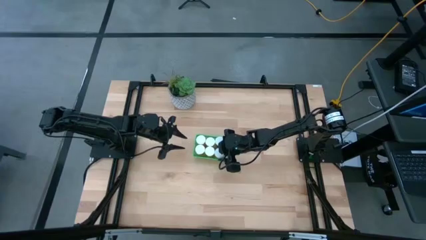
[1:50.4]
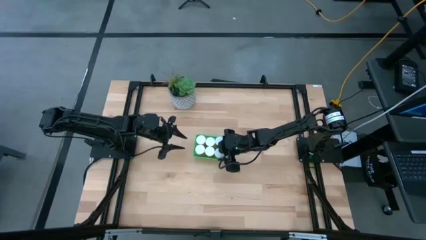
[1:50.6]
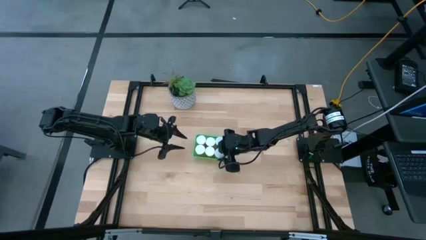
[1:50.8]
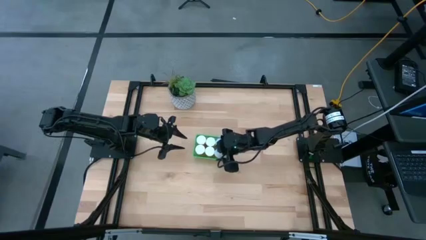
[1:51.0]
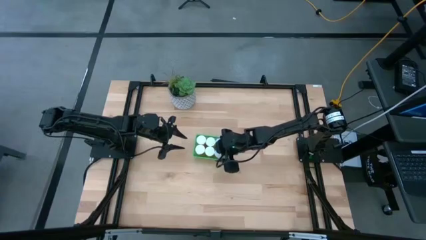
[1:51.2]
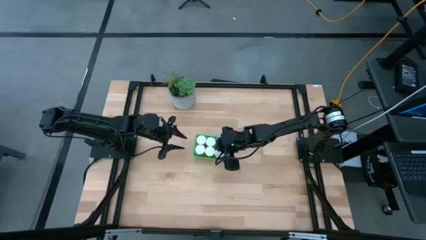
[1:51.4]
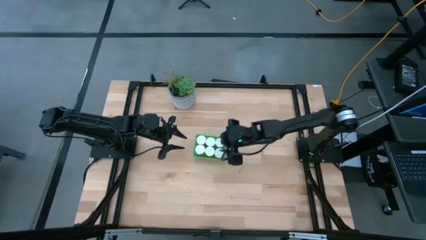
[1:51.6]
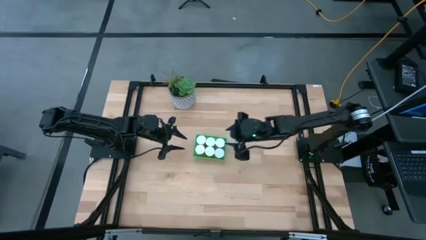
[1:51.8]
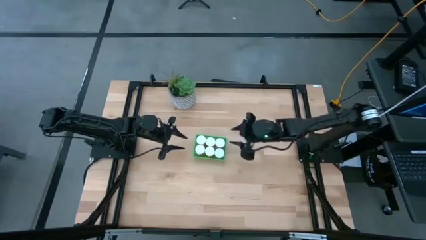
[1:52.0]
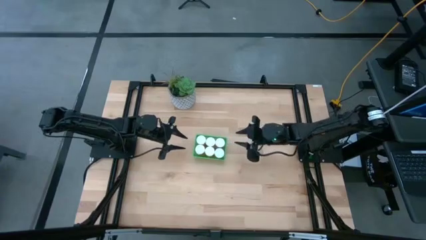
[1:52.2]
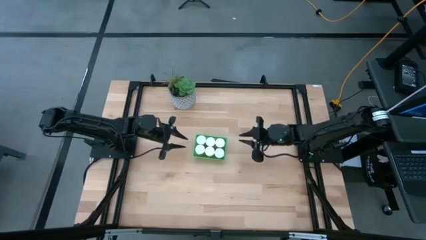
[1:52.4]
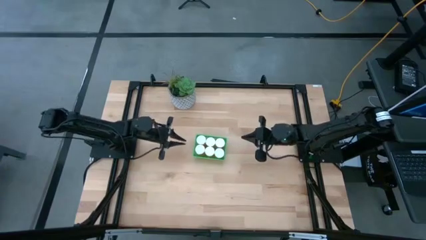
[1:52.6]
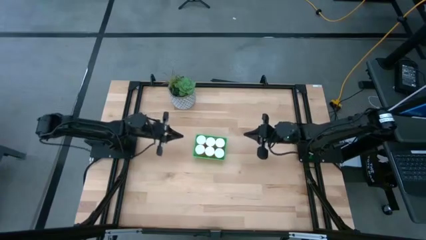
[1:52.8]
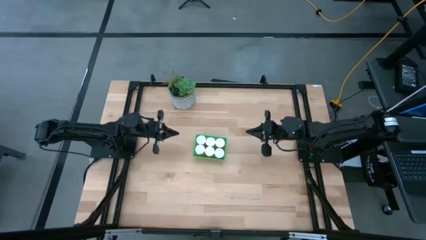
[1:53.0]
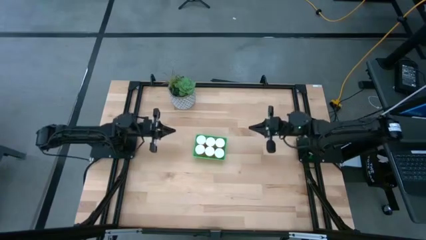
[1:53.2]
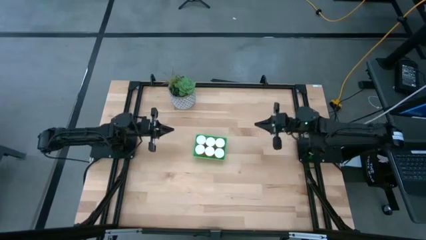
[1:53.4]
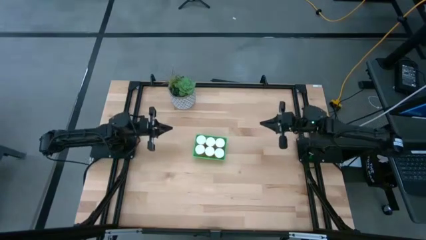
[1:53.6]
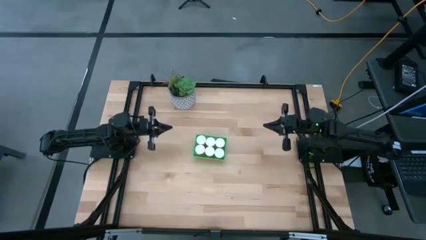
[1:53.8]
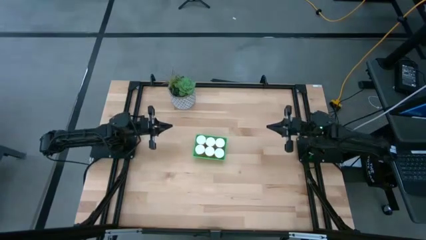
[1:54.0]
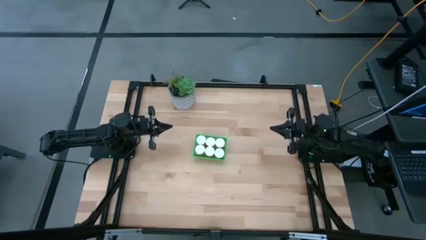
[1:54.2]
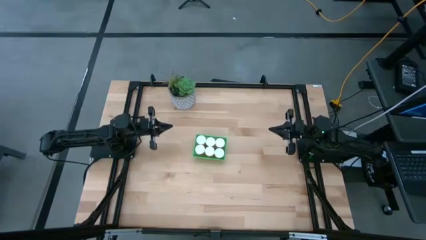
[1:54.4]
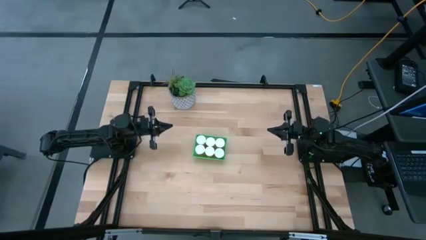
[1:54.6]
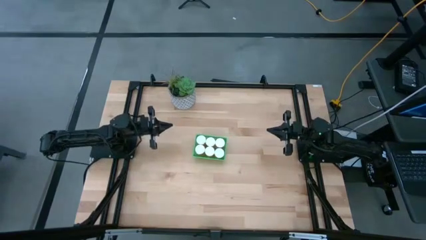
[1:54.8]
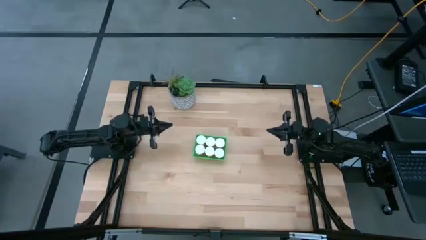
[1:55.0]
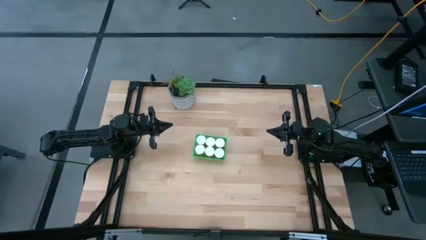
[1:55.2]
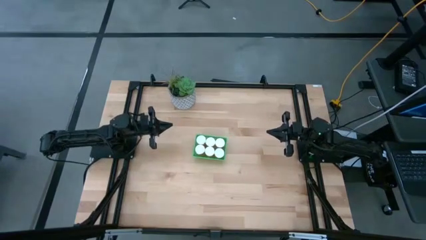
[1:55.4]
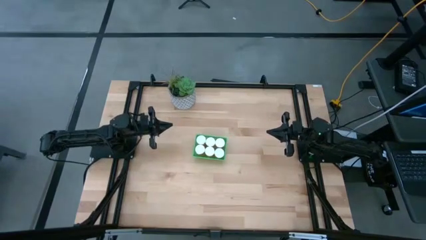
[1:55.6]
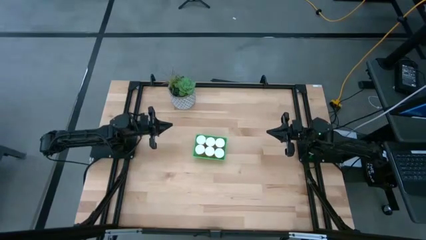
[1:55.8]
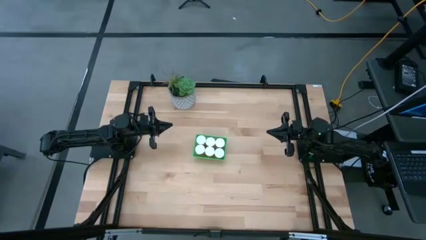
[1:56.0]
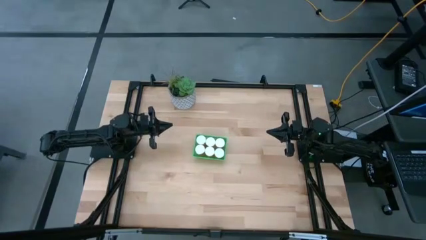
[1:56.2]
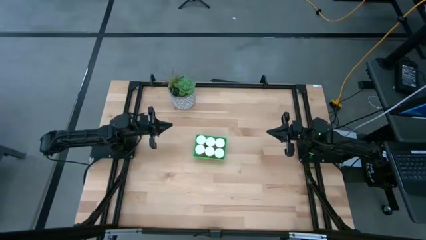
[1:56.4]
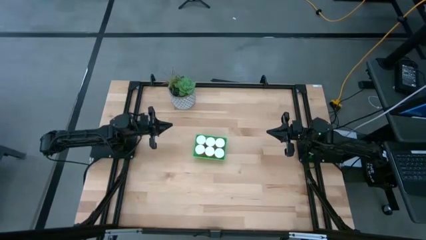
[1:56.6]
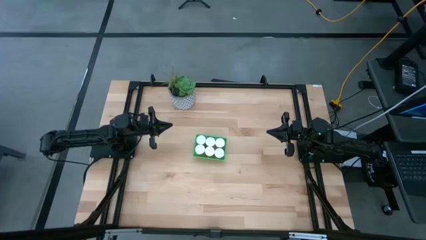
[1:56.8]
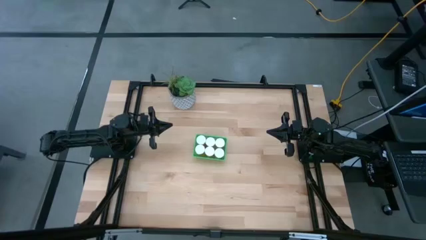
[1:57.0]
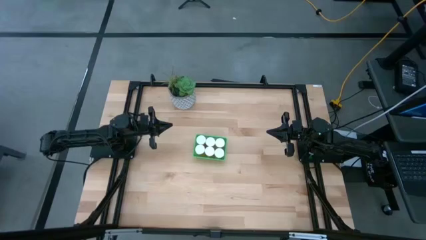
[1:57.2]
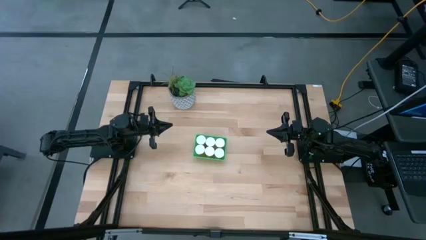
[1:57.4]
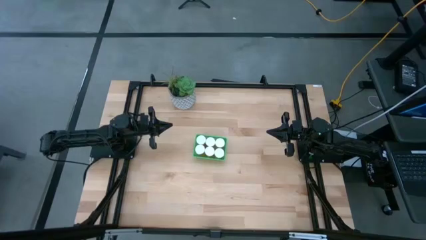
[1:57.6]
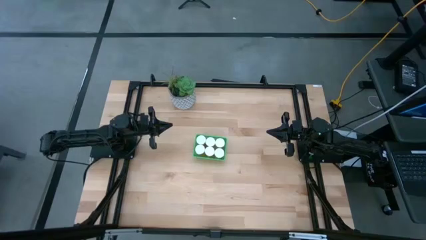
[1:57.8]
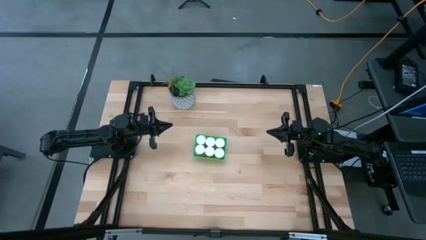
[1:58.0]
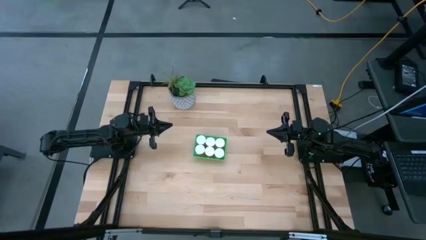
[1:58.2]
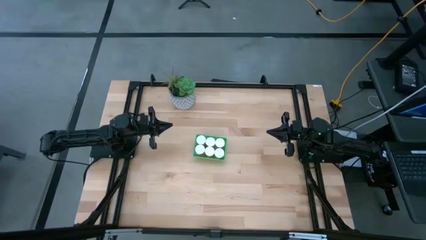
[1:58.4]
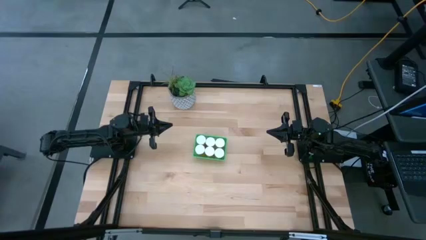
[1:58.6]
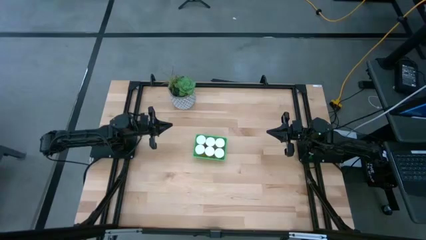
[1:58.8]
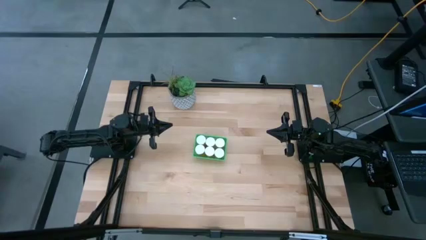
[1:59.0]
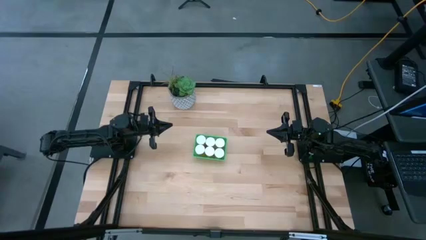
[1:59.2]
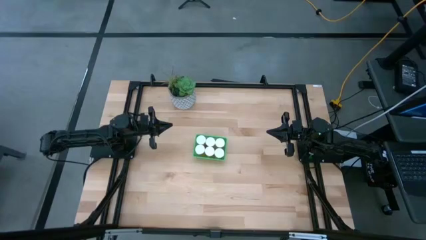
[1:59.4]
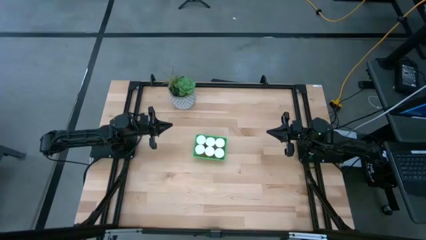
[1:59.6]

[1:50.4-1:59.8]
Task: Pick and place pill bottles into a basket
Return to Home Position
